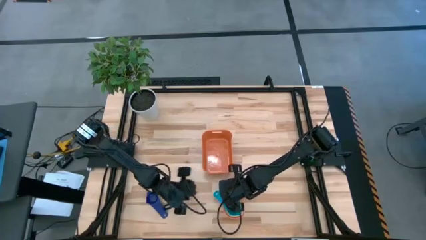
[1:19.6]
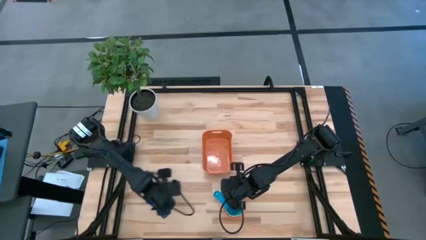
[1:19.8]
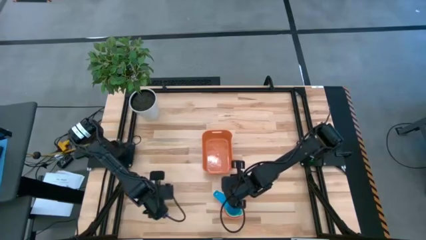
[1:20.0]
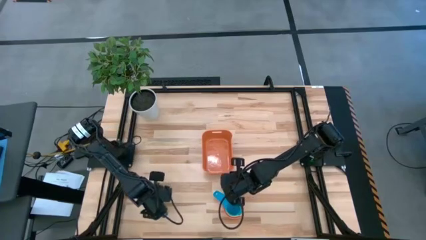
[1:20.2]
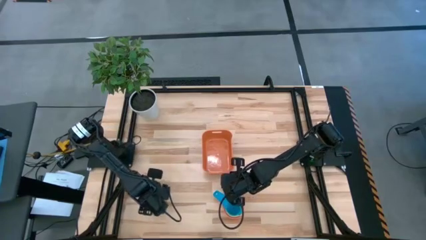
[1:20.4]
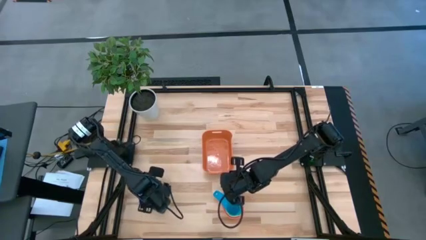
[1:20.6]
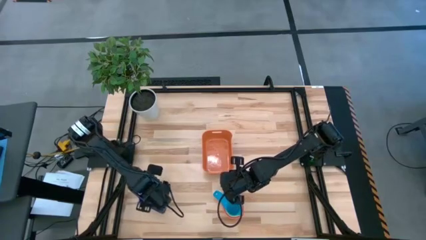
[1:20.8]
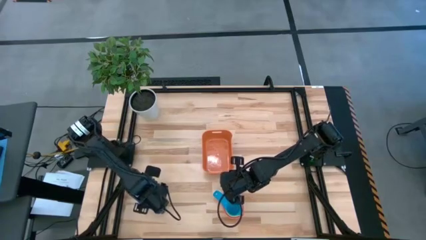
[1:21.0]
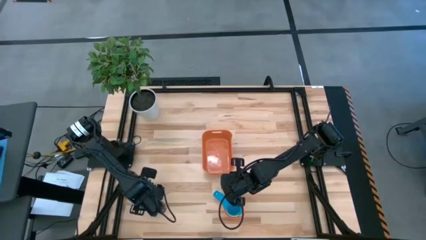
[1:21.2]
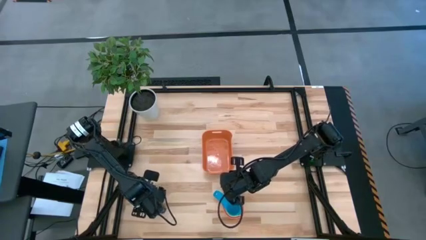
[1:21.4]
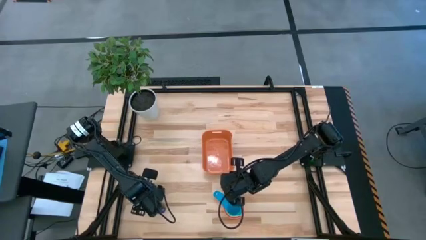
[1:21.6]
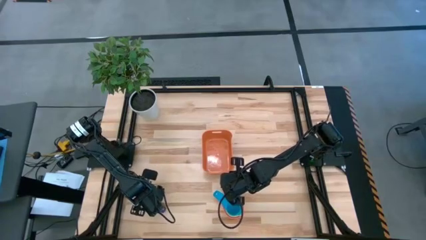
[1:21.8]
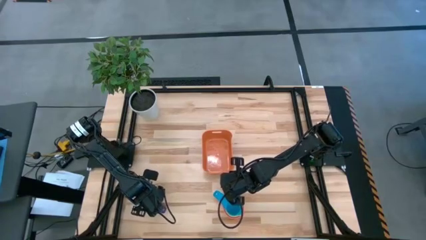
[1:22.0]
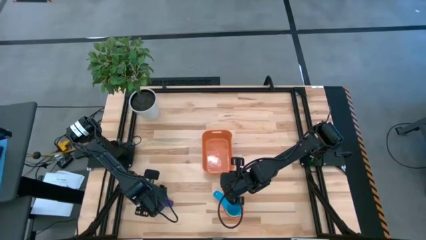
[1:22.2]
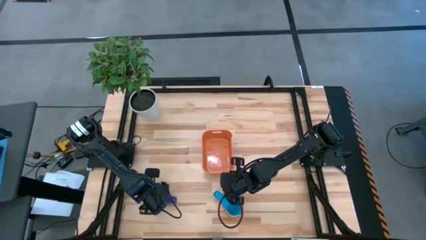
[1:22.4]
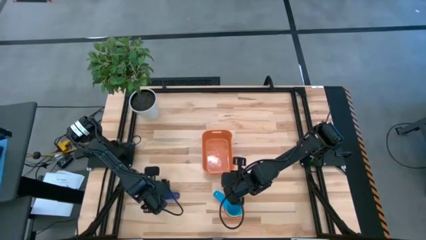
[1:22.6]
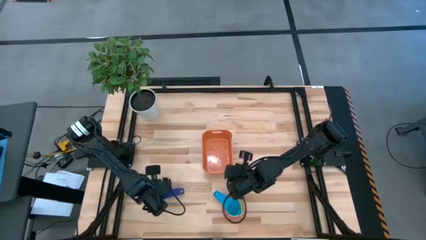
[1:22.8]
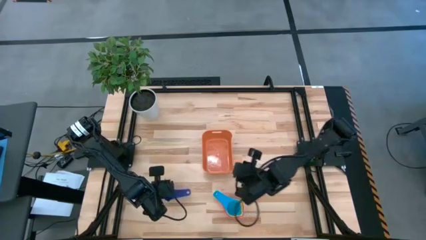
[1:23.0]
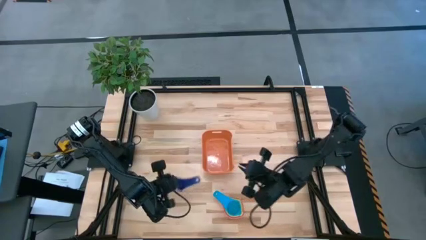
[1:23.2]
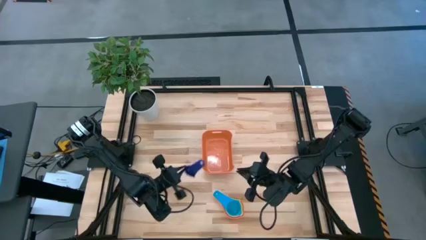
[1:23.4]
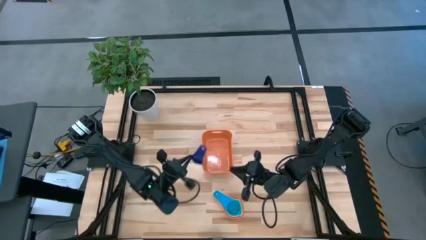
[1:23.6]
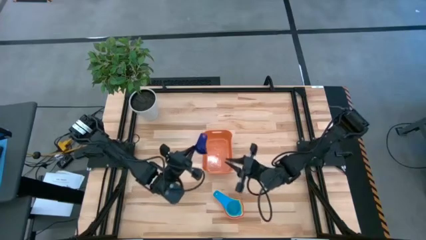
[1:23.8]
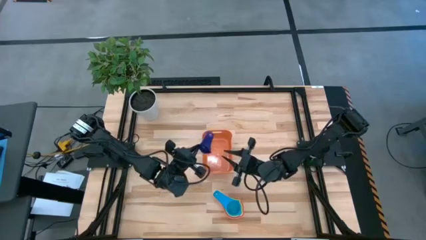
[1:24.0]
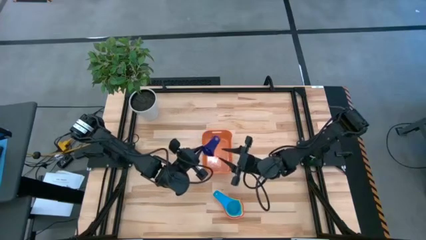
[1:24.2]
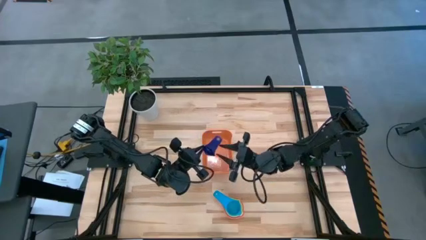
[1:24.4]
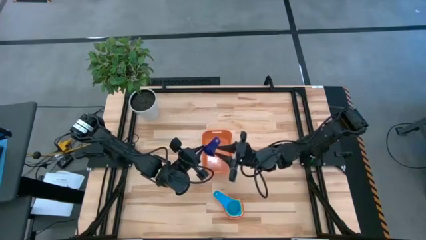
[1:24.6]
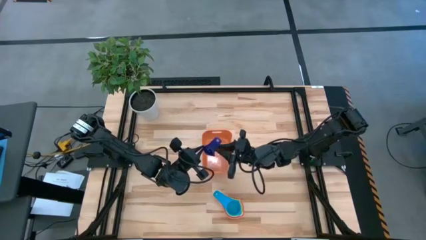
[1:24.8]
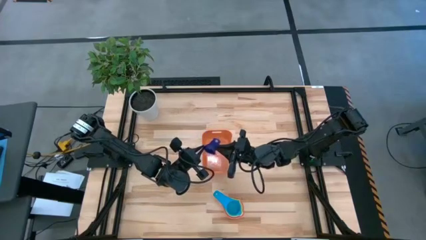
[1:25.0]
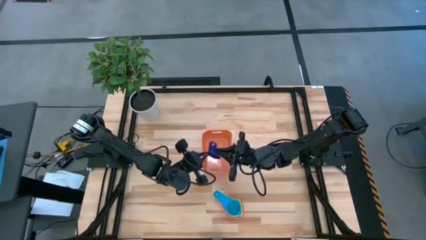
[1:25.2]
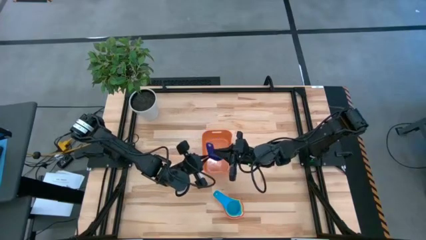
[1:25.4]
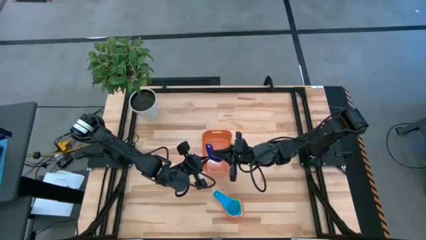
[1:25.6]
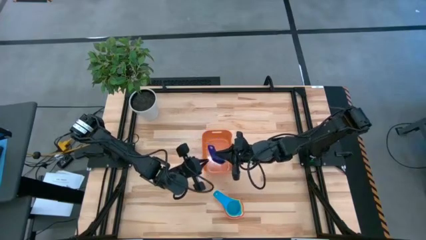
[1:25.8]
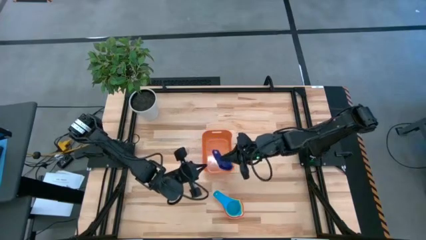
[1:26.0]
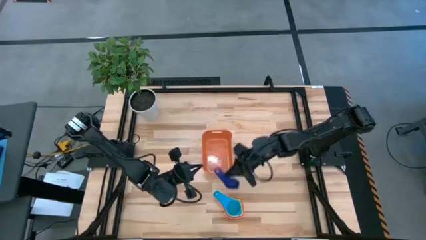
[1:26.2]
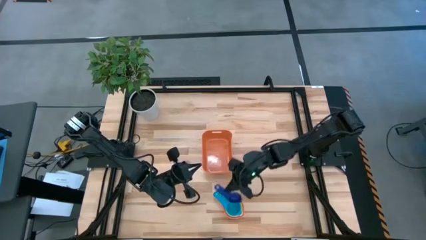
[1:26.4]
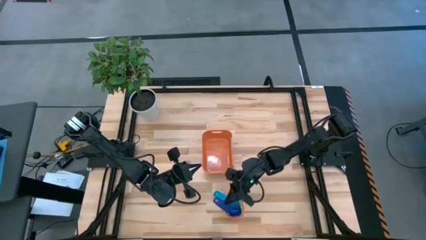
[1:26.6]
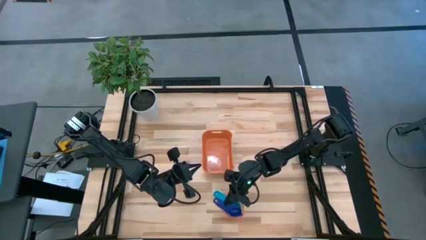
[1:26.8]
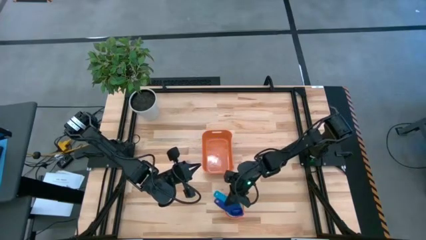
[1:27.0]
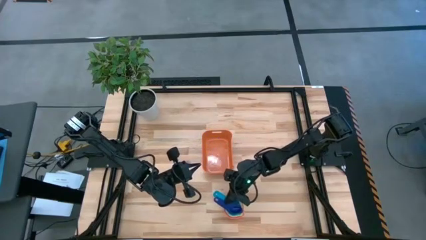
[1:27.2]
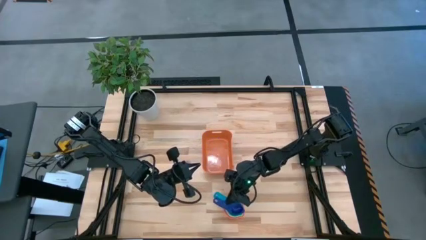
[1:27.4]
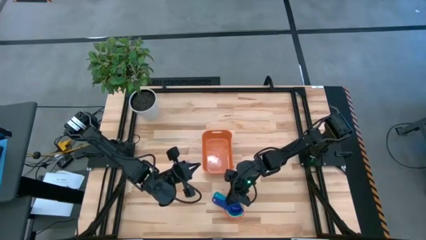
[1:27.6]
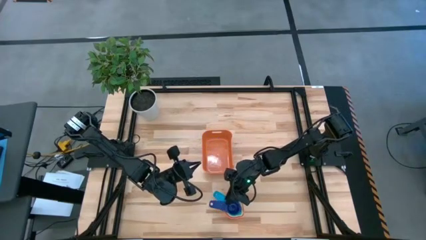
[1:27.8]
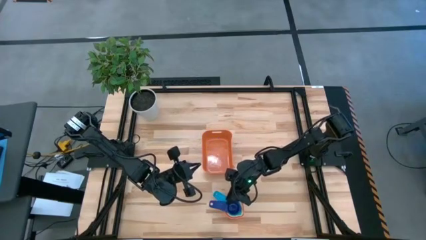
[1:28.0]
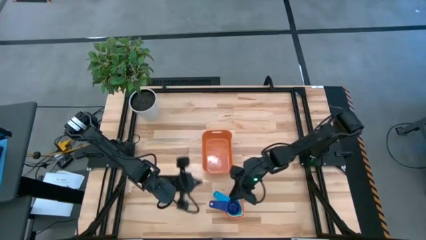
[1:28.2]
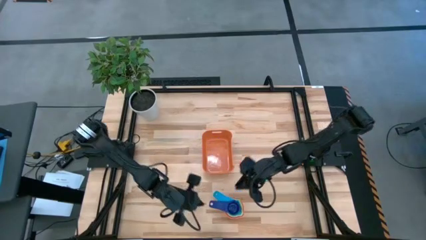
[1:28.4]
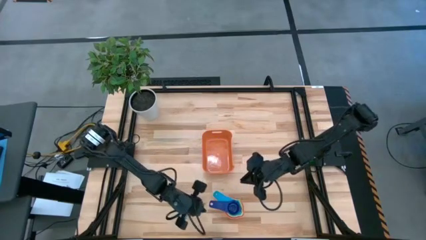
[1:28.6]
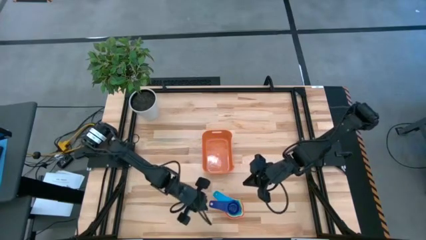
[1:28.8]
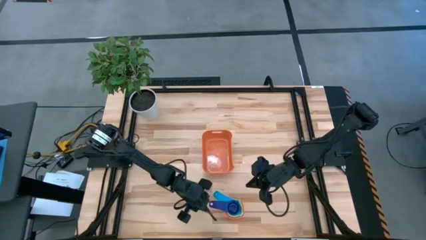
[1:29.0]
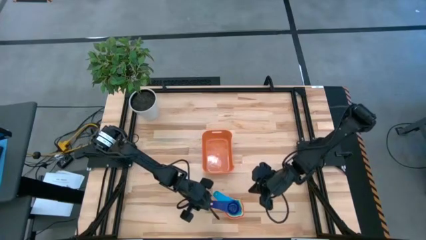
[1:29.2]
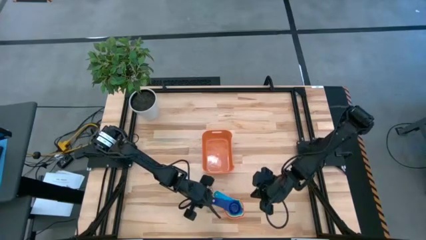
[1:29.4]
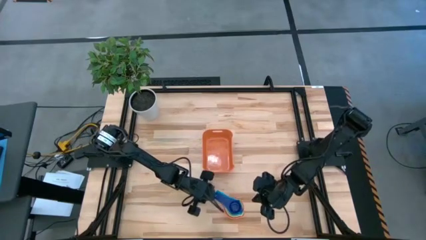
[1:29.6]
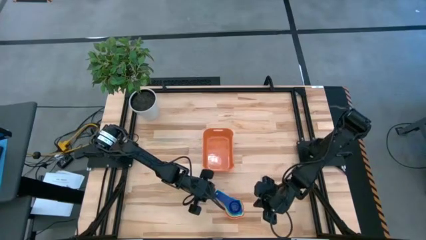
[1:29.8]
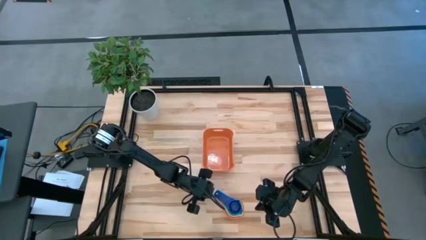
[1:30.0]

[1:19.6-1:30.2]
Task: Nest measuring cups in basket
Stack the dark blue measuring cup on top of the light blue measuring cup

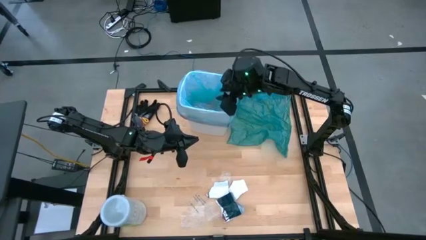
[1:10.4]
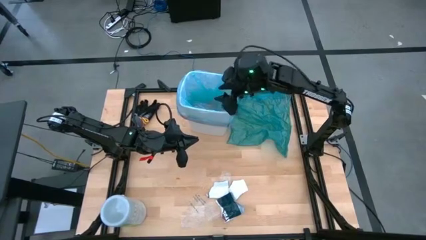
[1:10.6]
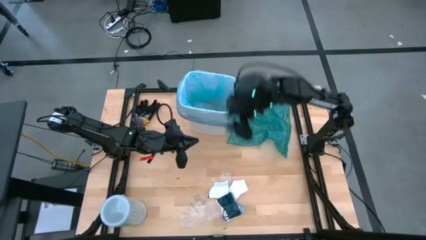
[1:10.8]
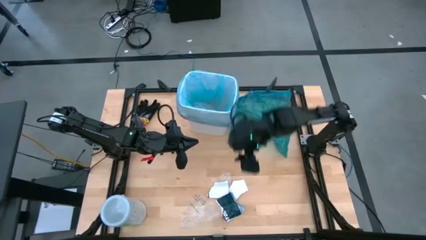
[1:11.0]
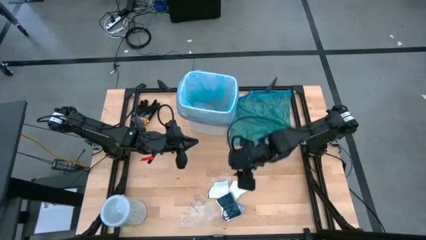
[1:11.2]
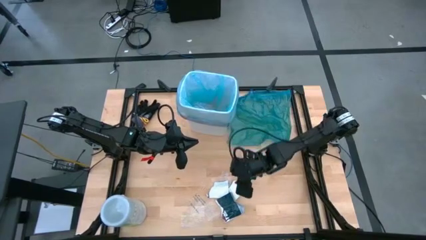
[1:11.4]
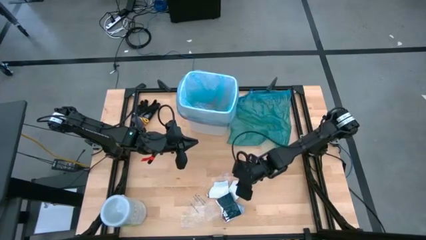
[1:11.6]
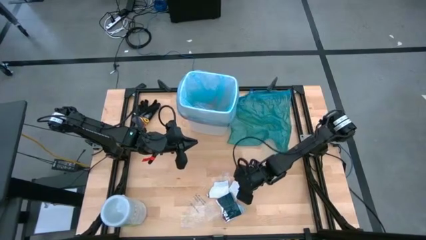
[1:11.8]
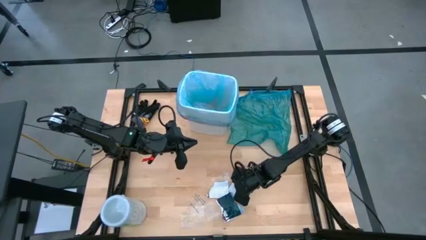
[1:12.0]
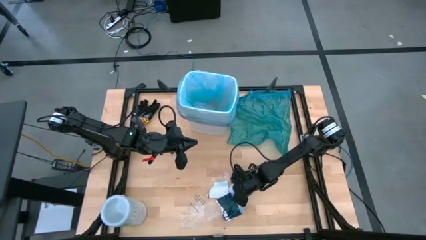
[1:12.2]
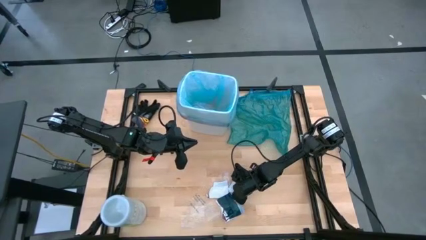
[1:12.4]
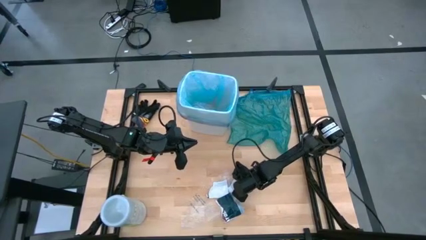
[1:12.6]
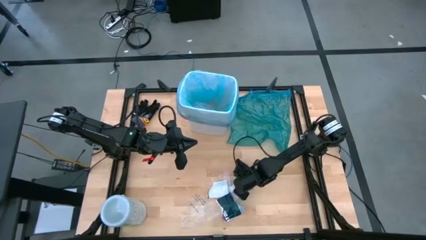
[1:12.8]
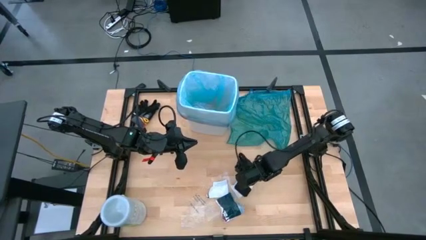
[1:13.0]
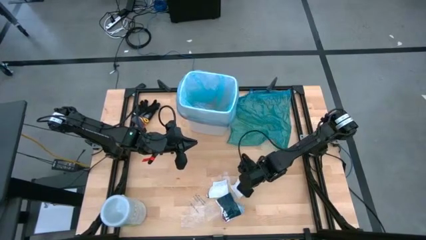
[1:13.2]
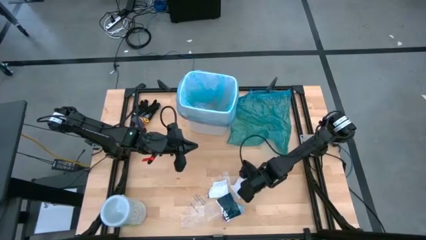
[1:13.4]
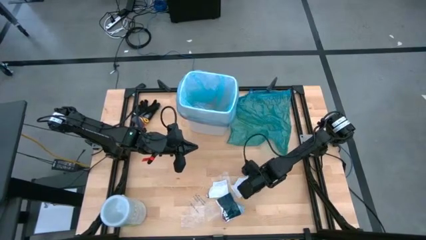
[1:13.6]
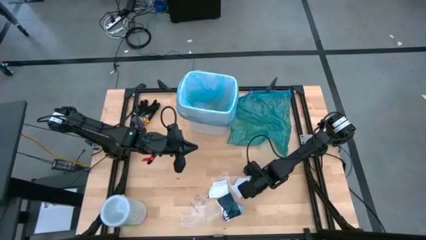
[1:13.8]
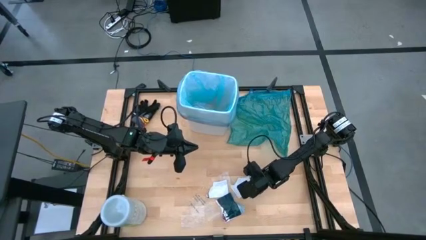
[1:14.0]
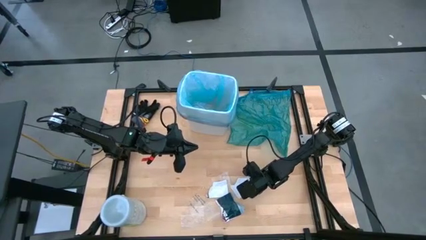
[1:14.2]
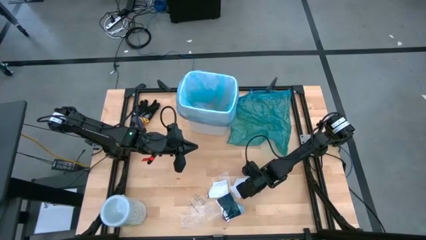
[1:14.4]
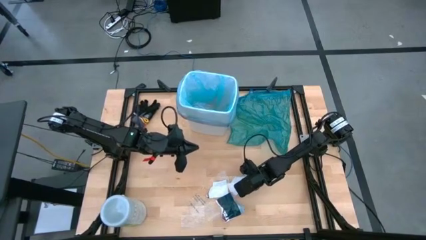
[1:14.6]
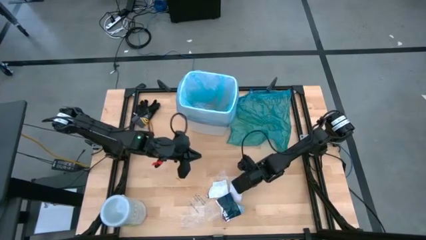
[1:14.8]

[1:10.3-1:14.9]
Task: place trash/remove bag and relplace
Put the white magazine paper into the trash bin
